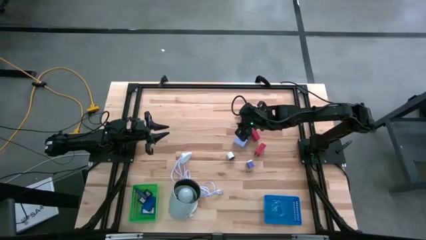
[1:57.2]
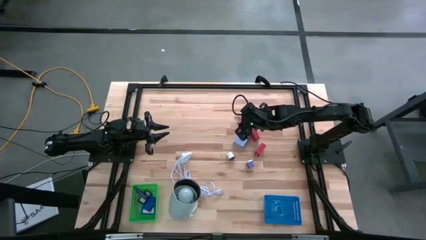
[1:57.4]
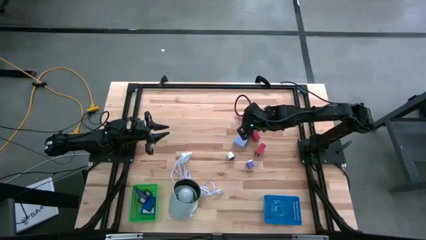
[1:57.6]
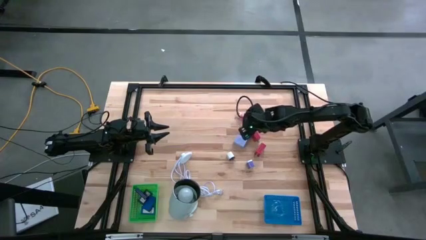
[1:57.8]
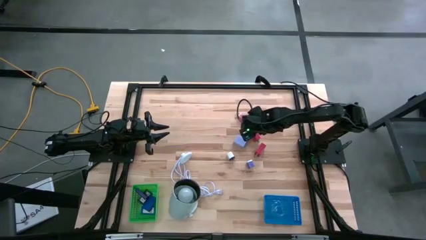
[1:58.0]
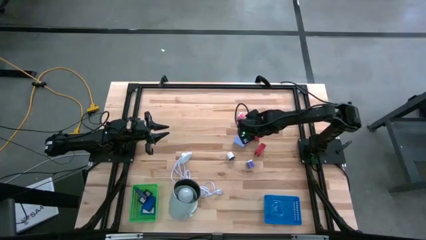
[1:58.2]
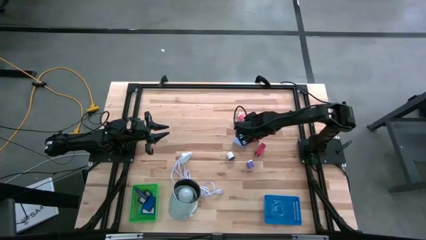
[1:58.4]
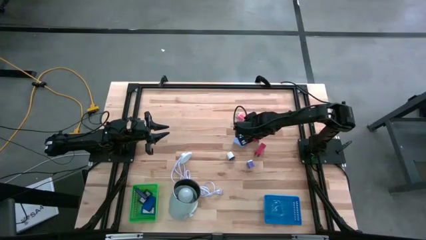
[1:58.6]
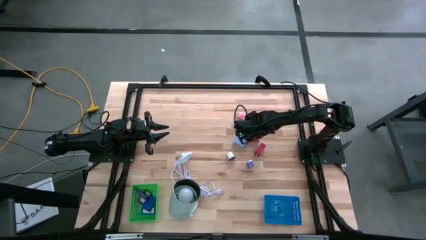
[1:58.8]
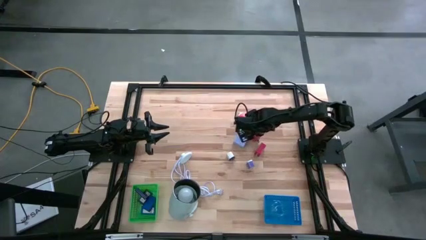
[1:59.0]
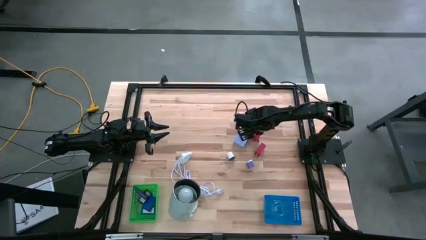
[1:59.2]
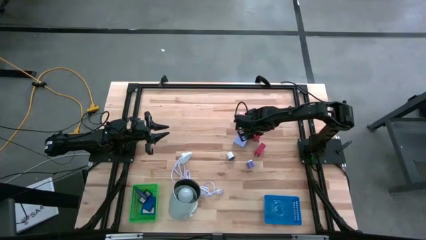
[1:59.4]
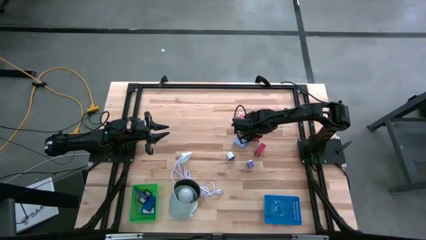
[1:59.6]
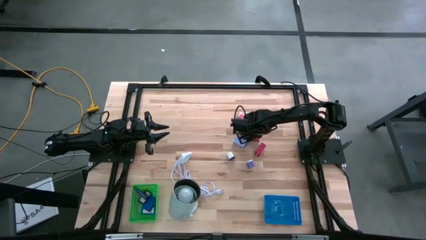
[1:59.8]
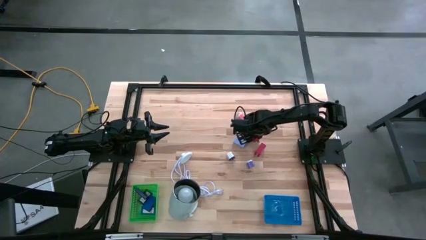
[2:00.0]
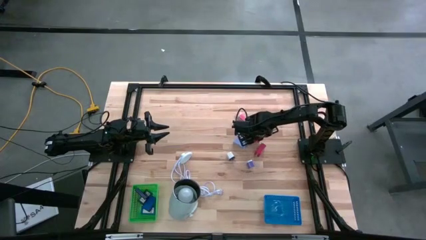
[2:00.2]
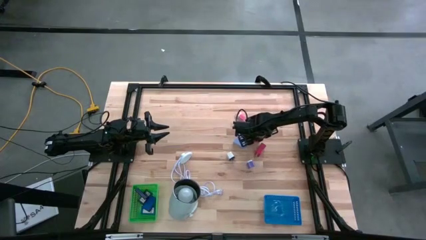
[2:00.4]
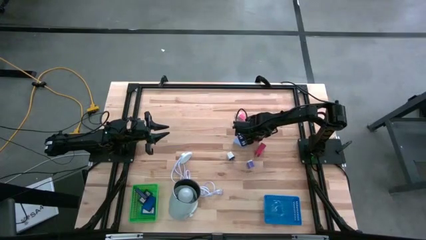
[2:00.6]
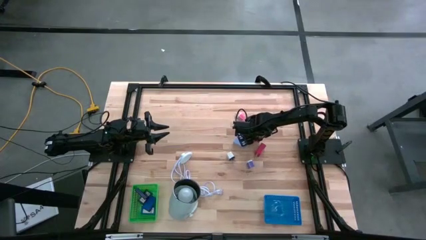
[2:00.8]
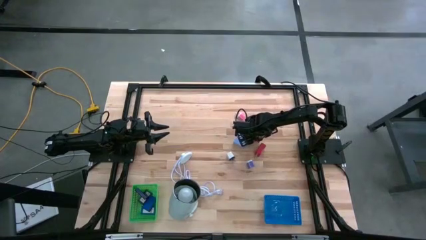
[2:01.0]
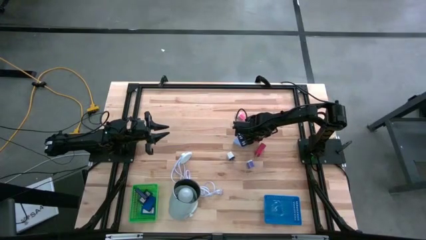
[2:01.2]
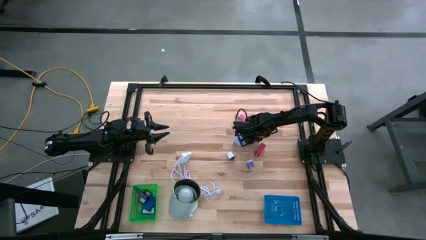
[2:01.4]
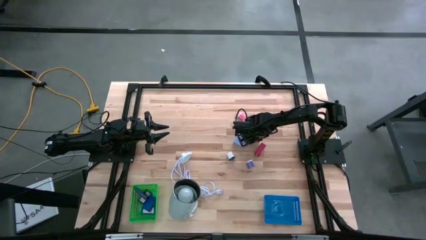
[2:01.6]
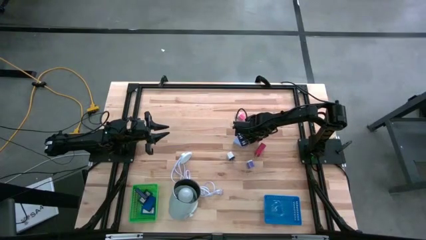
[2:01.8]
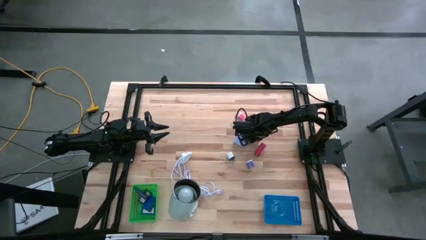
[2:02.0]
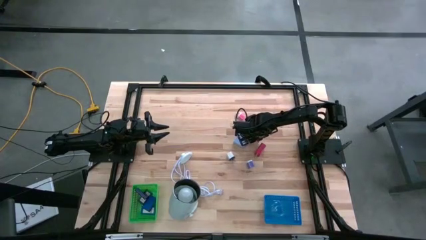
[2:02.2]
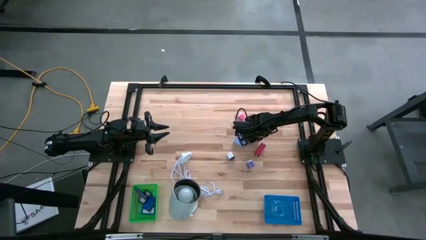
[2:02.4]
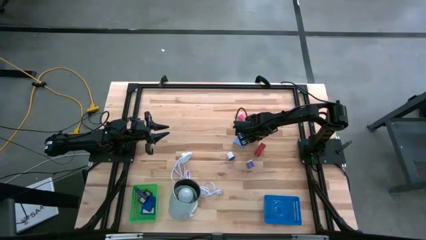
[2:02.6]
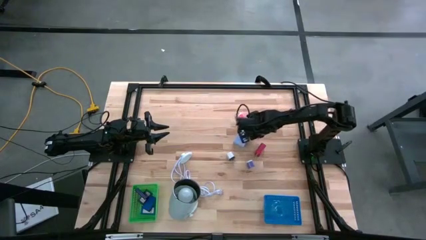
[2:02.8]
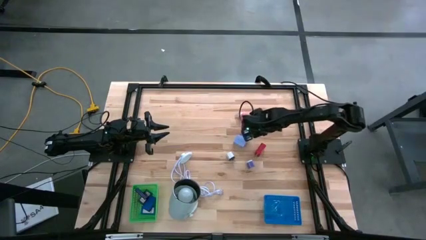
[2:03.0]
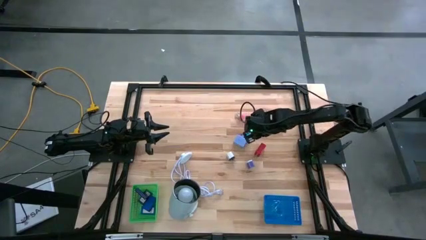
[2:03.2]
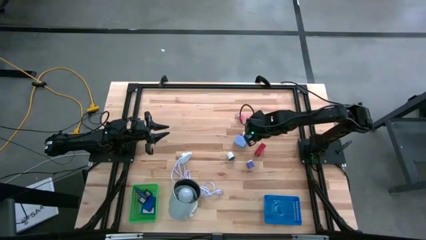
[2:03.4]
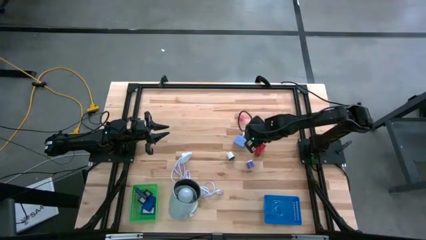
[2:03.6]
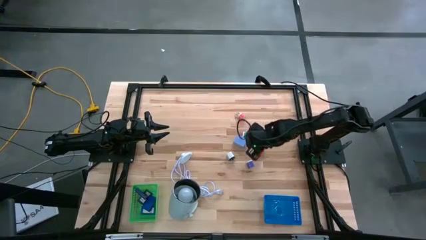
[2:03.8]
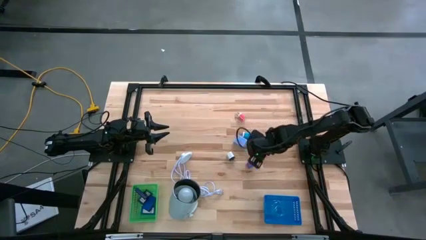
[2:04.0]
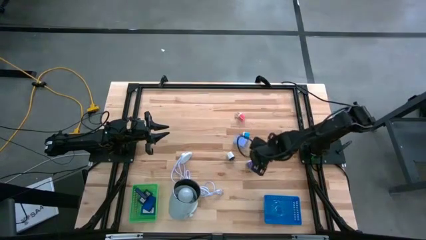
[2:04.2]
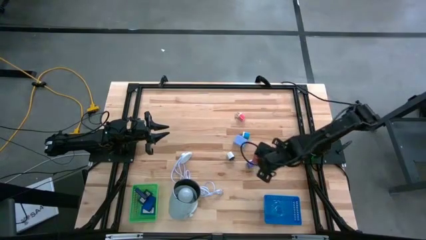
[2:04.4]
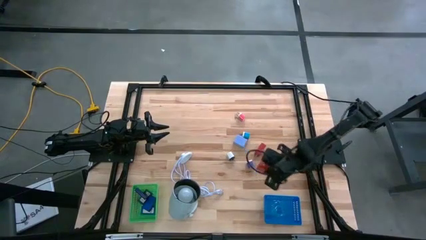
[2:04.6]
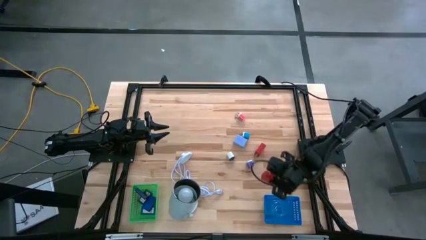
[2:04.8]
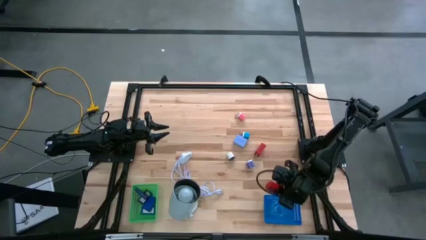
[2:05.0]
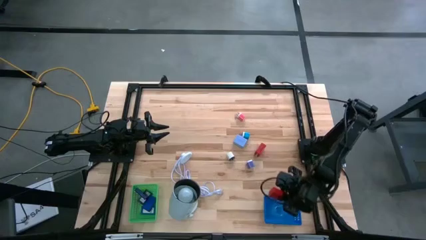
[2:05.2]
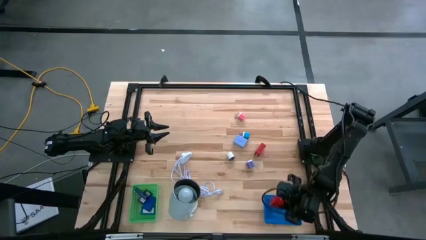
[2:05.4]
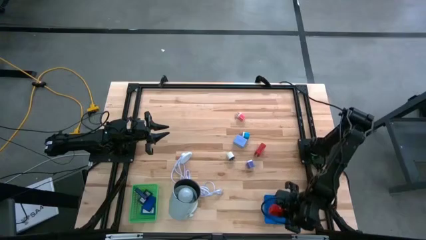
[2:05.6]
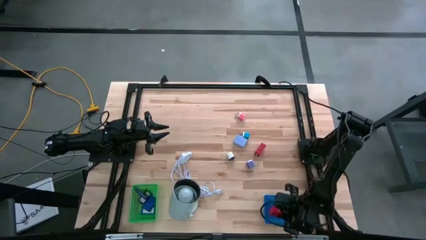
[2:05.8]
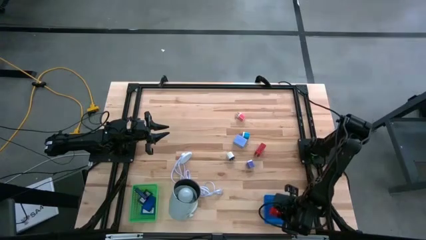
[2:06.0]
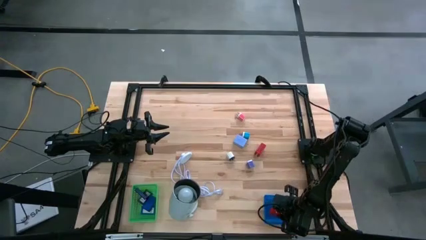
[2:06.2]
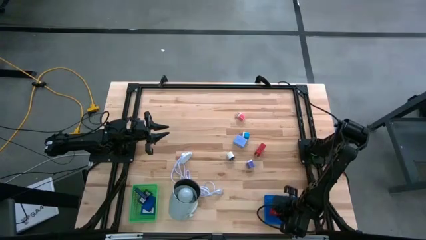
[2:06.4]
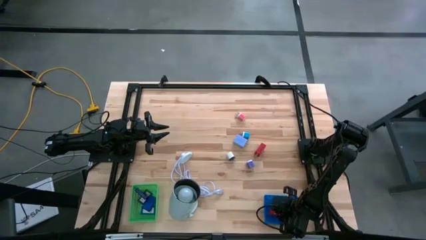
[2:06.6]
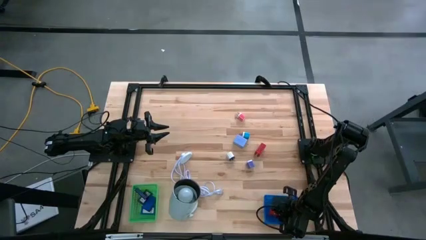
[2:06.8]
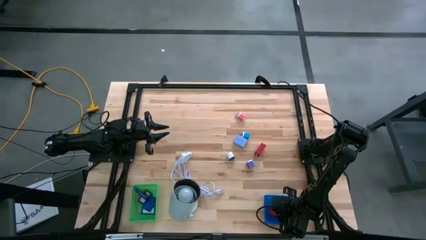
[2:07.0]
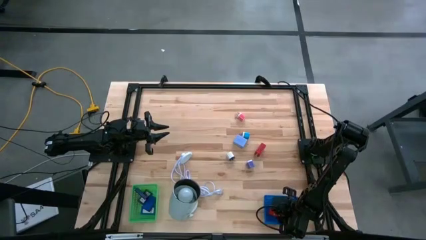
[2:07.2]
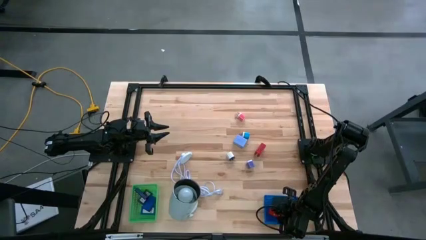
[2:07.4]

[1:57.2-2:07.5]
Task: Pick & Place Office items
Put the top red charger adapter into the blue basket

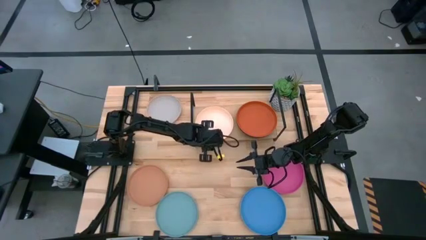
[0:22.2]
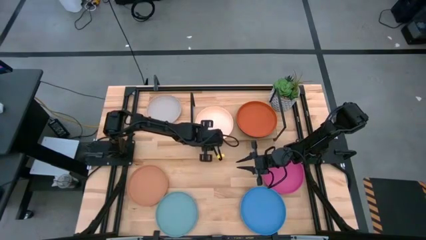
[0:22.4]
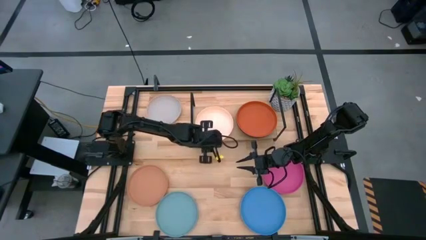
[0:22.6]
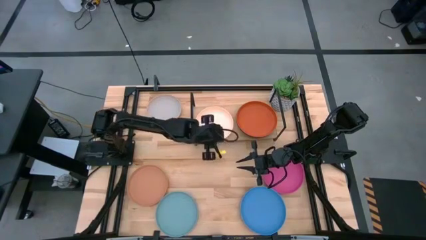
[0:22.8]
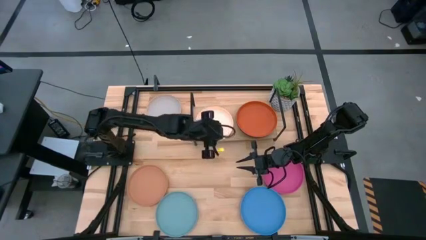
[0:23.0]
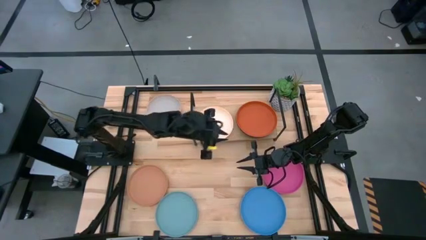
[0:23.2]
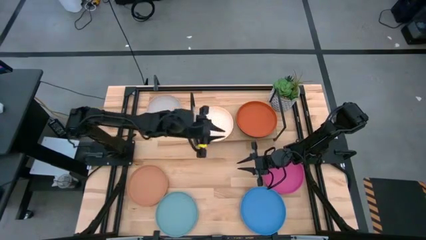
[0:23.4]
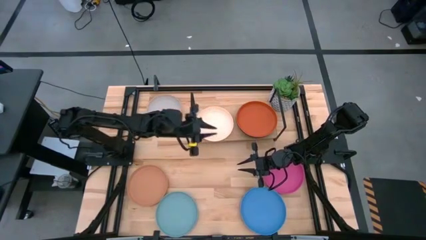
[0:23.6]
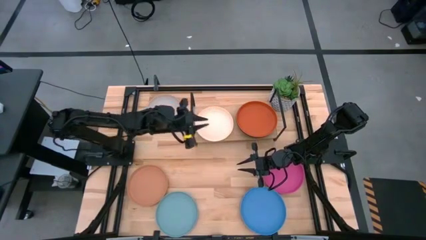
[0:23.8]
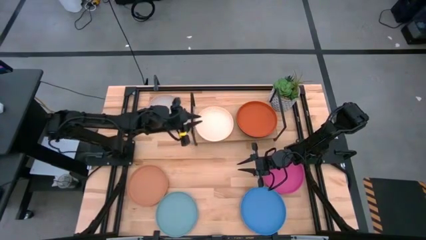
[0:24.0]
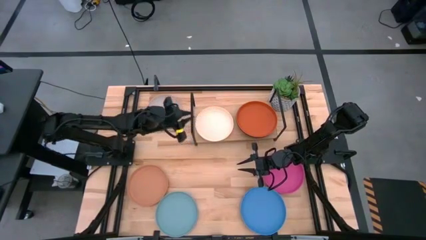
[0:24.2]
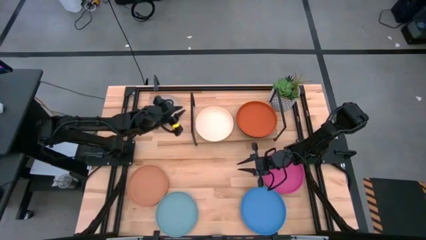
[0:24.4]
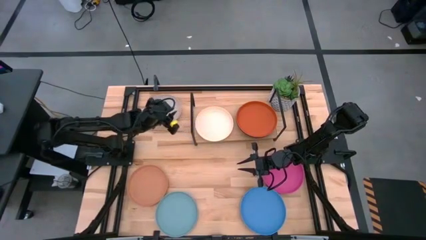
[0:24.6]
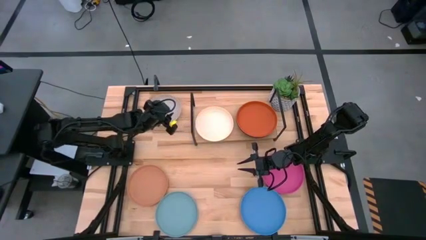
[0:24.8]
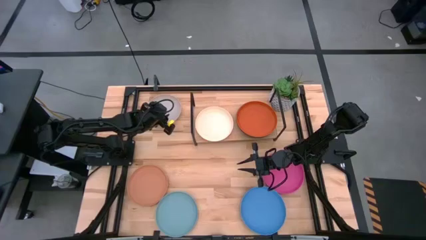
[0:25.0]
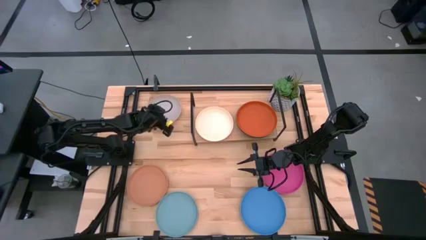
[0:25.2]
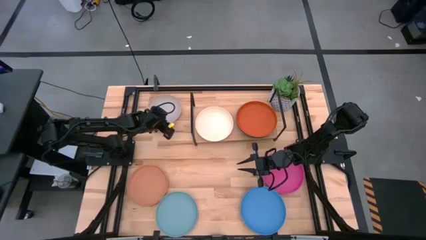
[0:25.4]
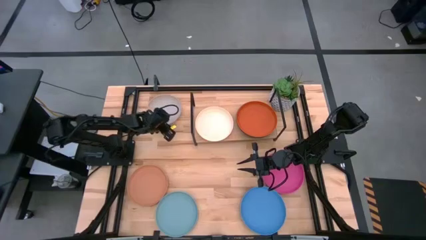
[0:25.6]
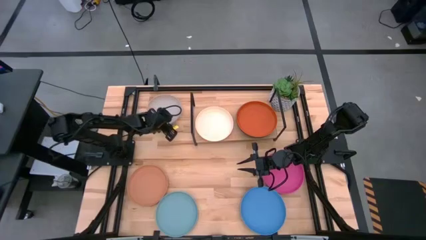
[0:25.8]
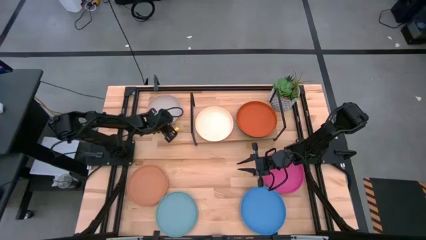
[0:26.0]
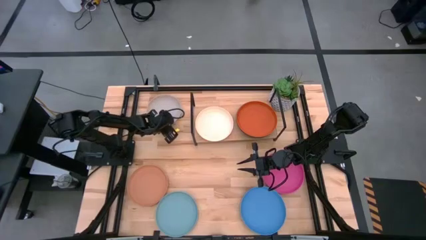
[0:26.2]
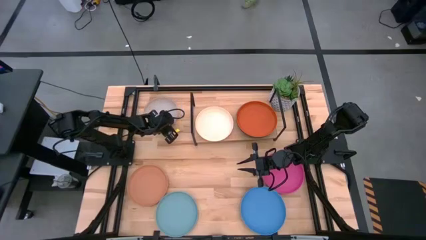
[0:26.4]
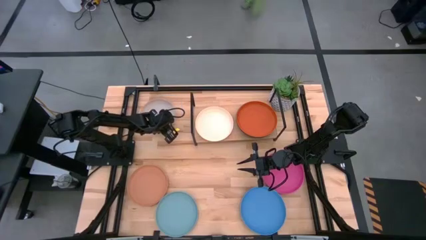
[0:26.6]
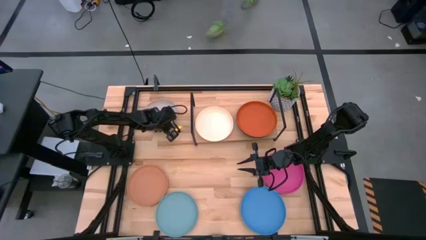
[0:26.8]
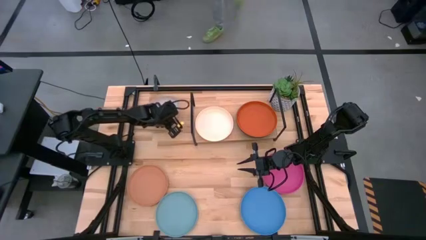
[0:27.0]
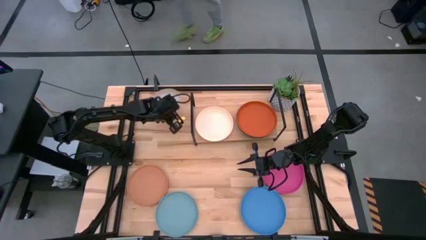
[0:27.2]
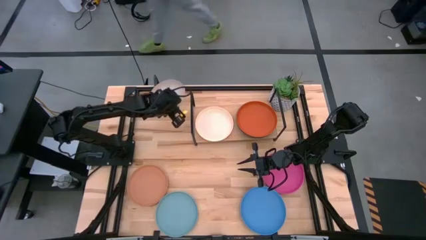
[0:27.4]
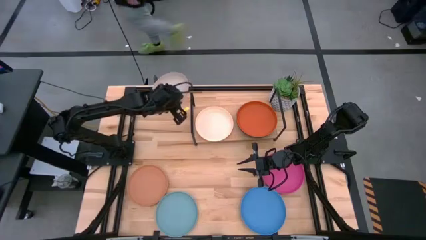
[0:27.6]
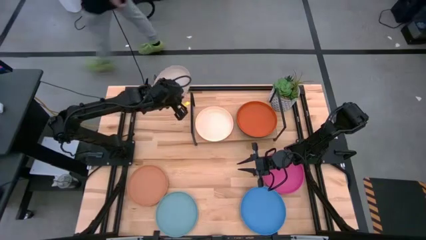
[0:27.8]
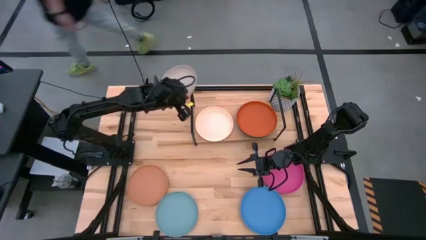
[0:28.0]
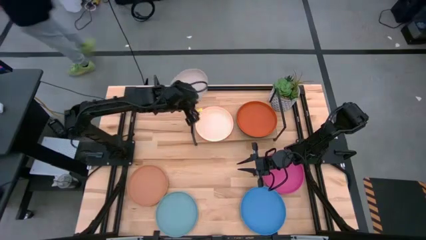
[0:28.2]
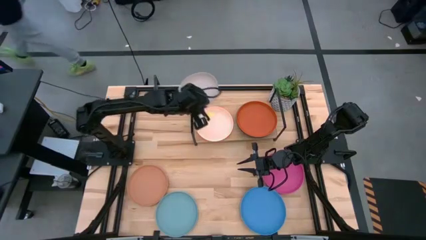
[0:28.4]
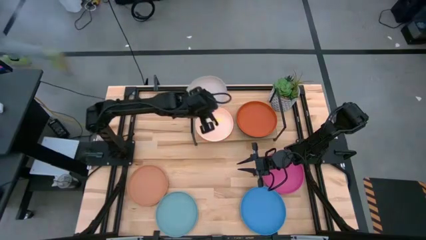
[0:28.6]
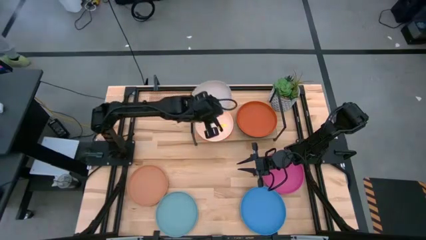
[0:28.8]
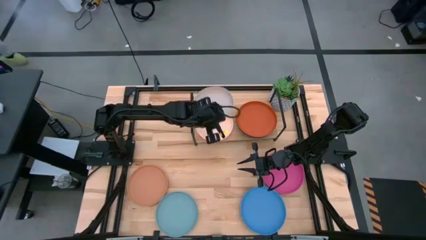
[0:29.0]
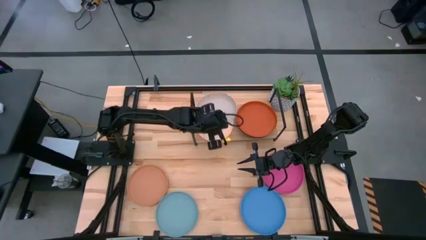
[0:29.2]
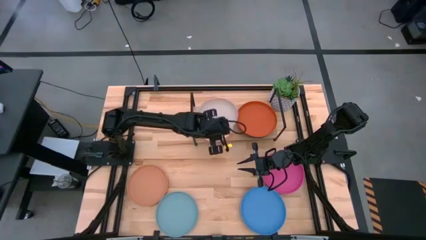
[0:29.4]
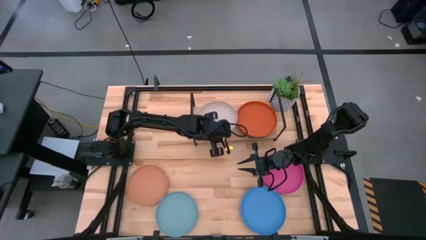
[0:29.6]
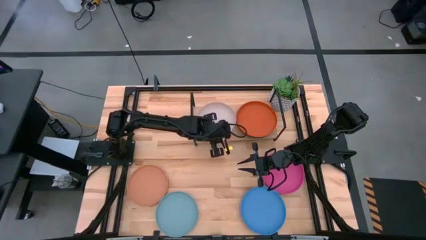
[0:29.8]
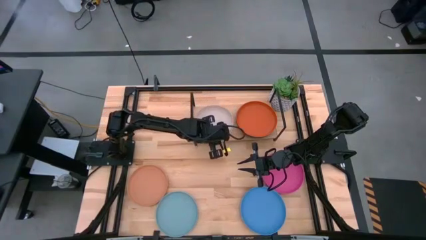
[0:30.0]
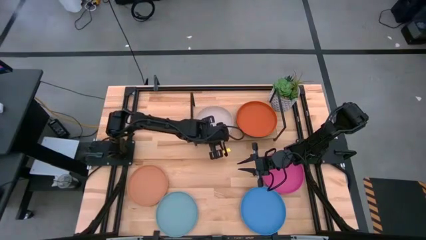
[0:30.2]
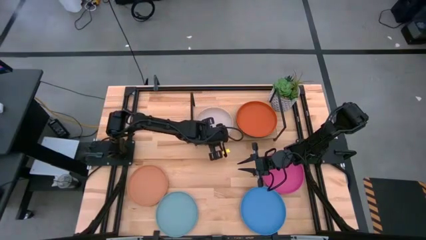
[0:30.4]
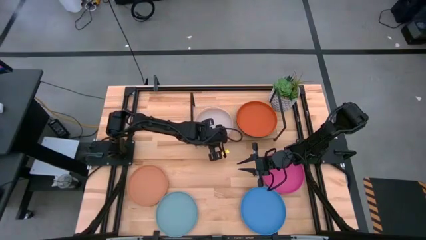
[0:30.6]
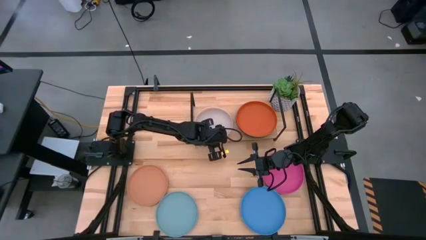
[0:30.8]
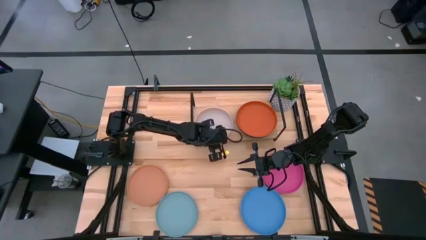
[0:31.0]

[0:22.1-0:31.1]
Task: Place and stack plates onto a shelf
Stack the gray plate on top of the light pink plate on the shelf
